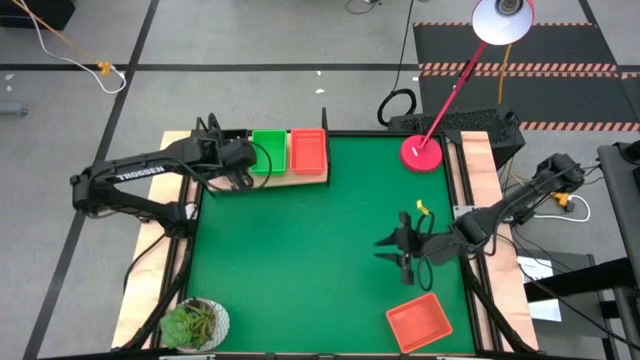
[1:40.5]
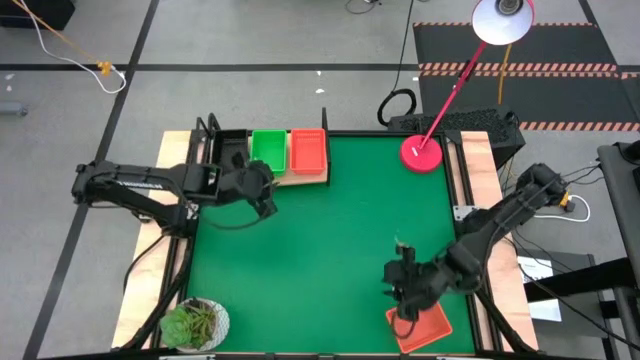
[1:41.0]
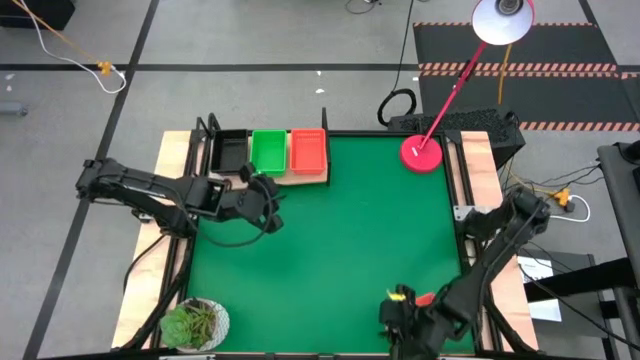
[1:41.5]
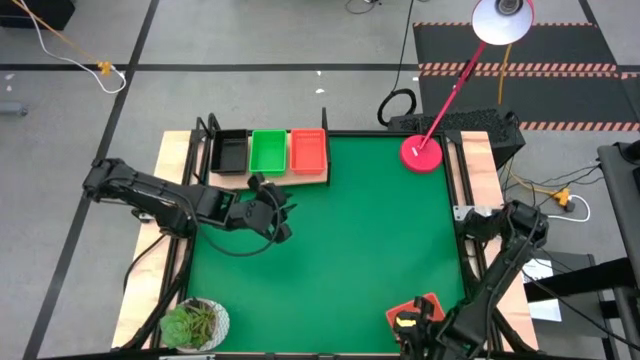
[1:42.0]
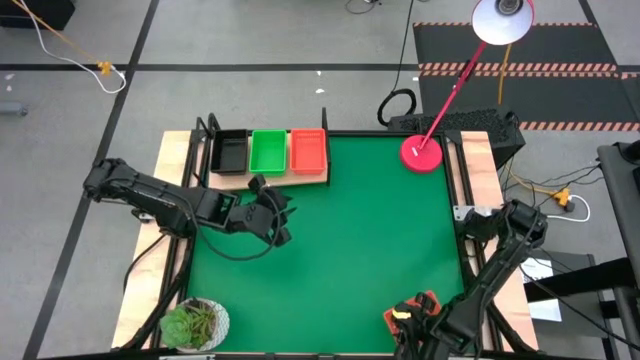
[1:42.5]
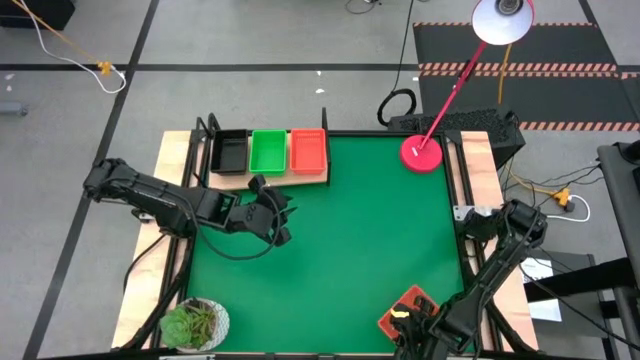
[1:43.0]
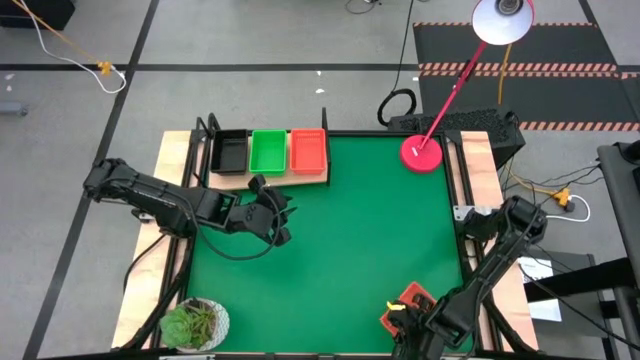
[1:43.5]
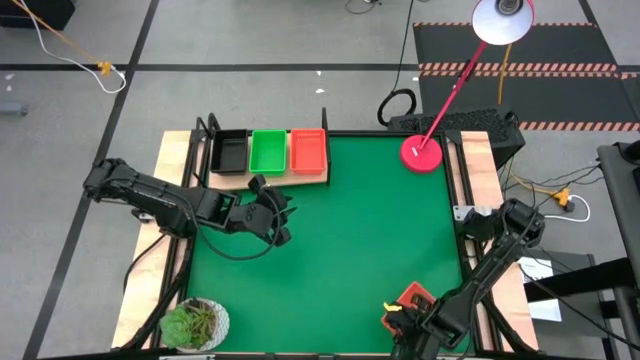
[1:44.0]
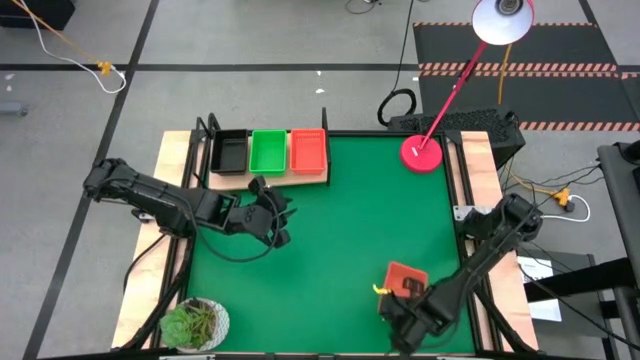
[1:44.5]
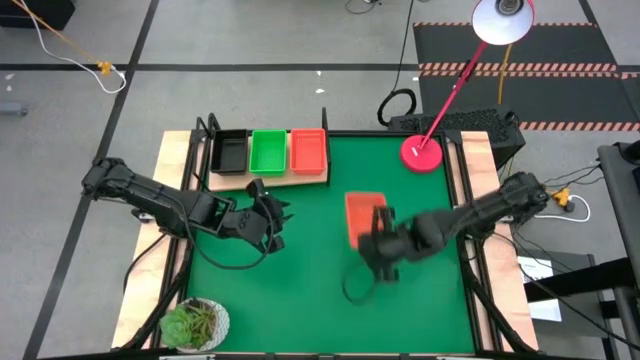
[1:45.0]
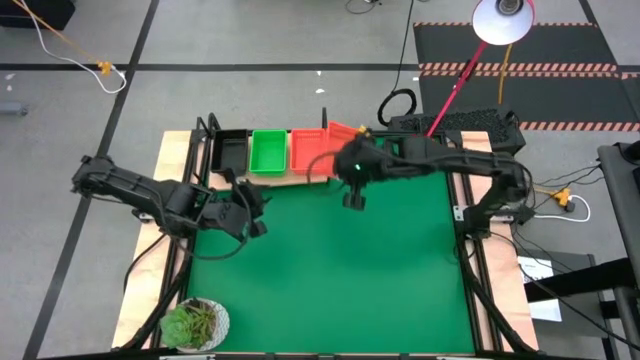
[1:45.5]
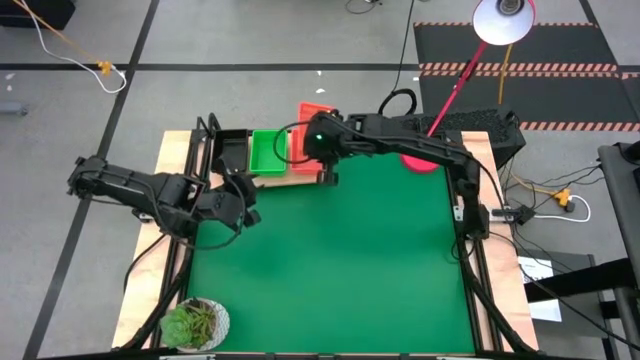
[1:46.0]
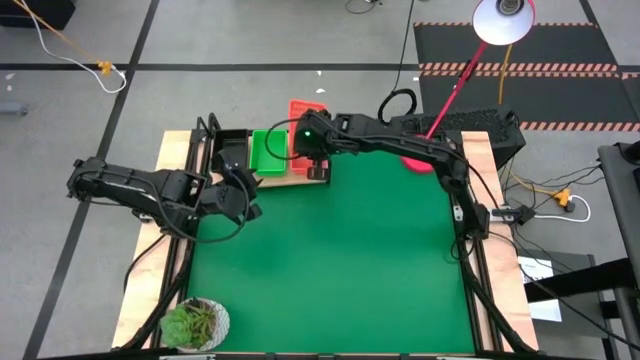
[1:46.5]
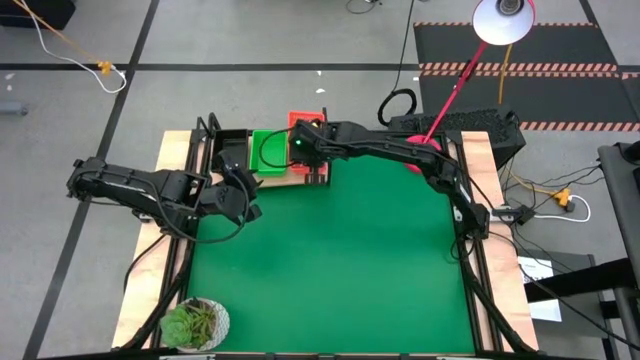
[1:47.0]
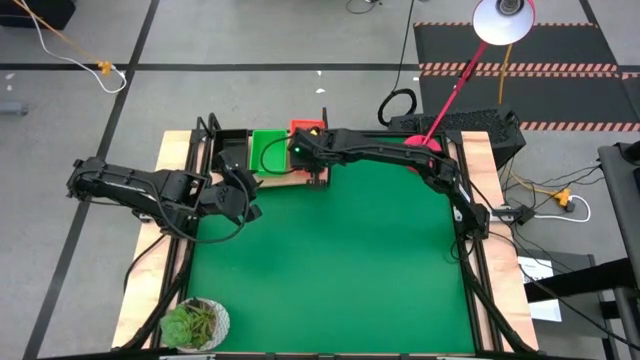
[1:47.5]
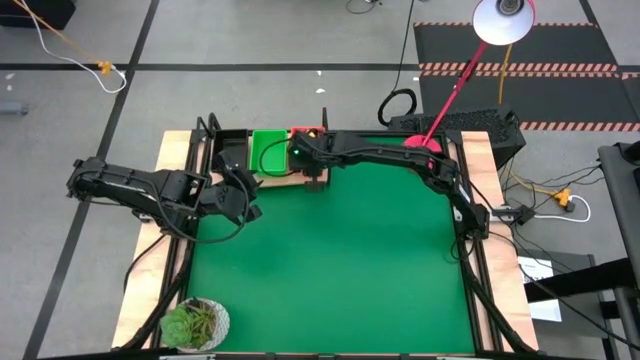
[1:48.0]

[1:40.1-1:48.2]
Task: Stack baskets on shelf by color
Stack the orange bin on top of the orange bin on the shelf

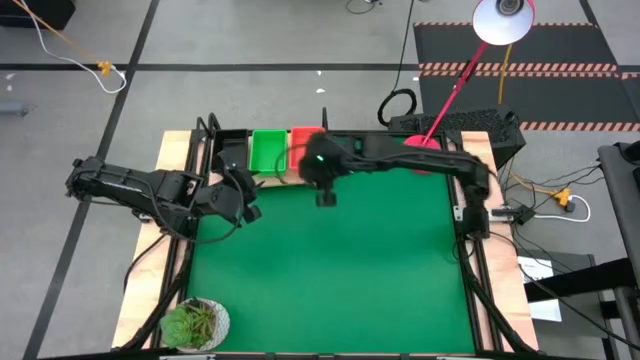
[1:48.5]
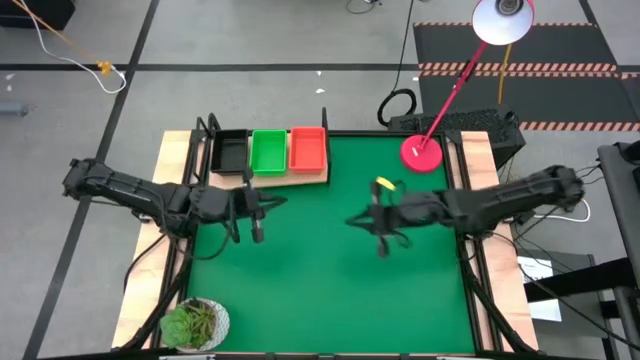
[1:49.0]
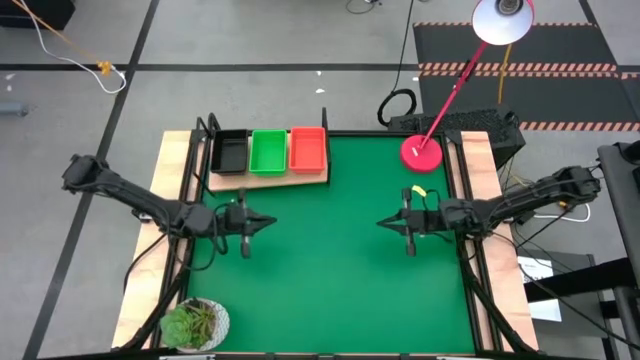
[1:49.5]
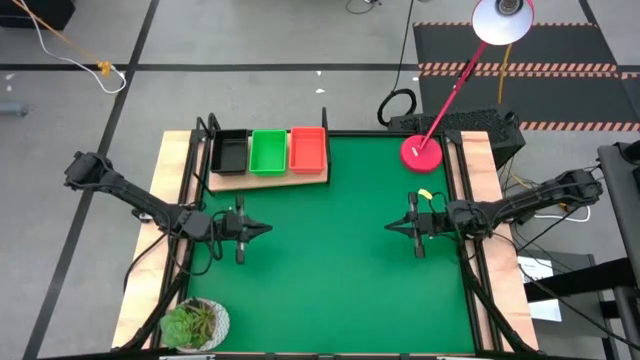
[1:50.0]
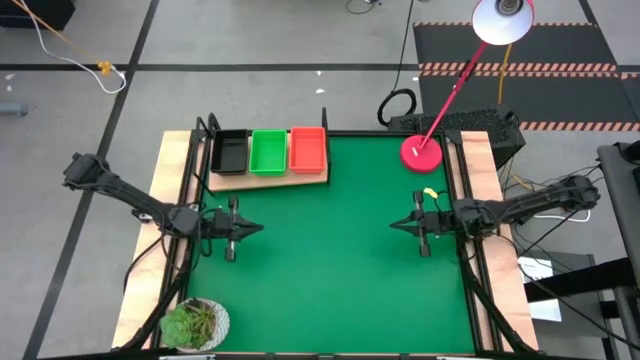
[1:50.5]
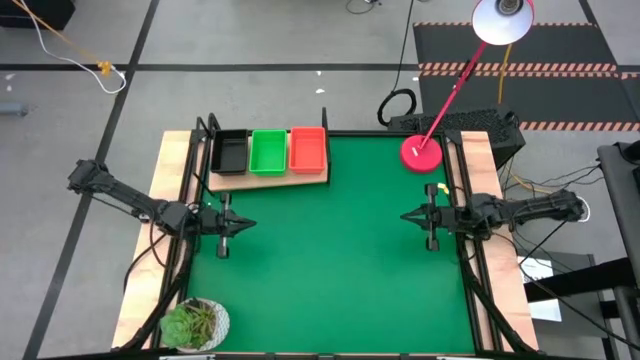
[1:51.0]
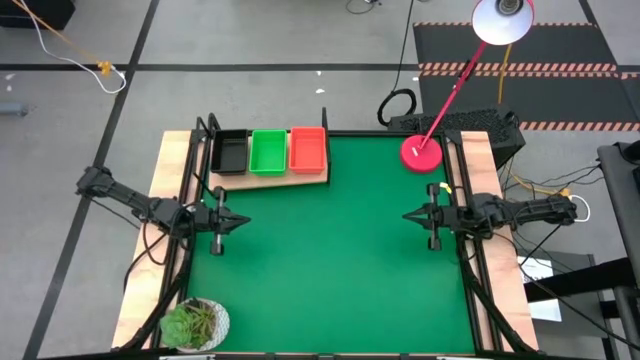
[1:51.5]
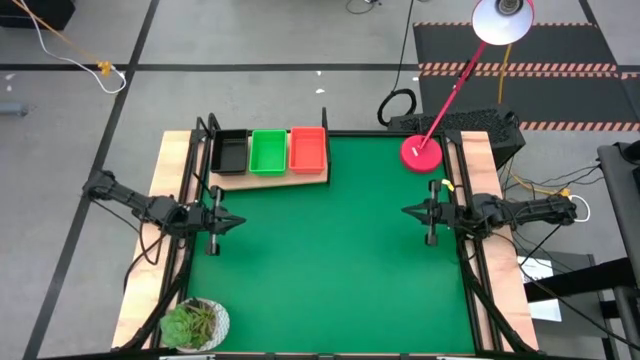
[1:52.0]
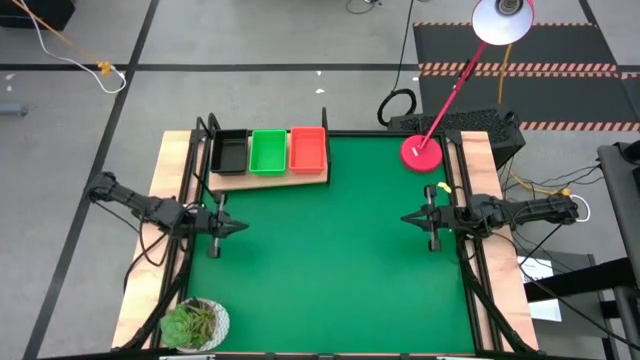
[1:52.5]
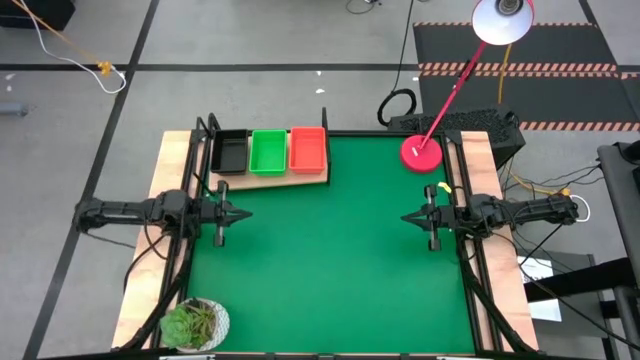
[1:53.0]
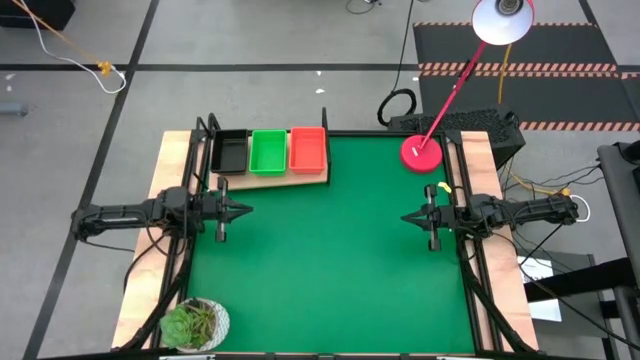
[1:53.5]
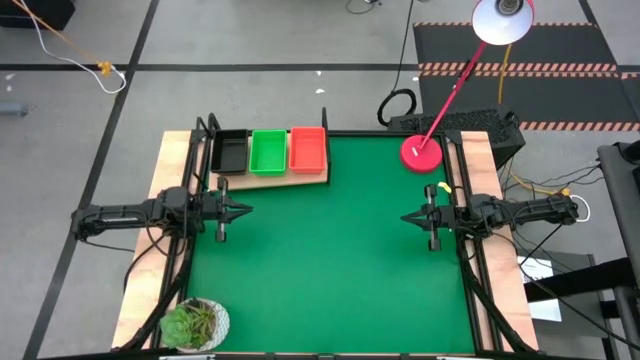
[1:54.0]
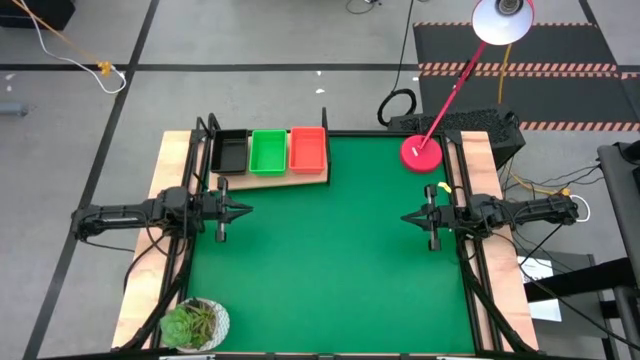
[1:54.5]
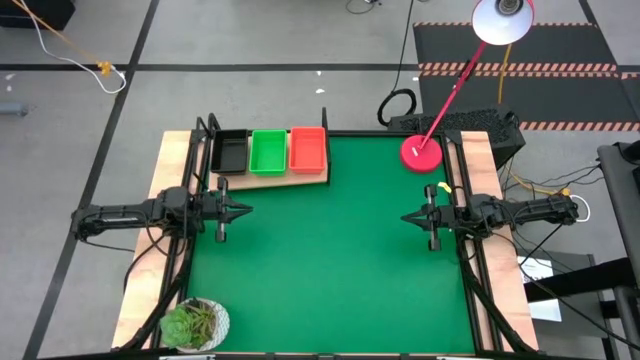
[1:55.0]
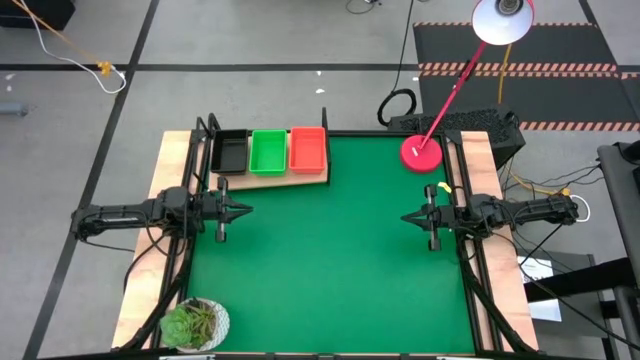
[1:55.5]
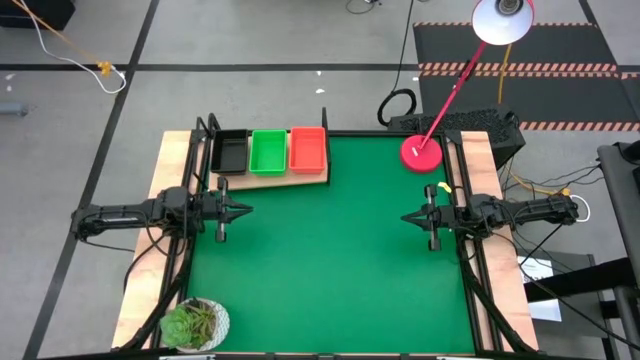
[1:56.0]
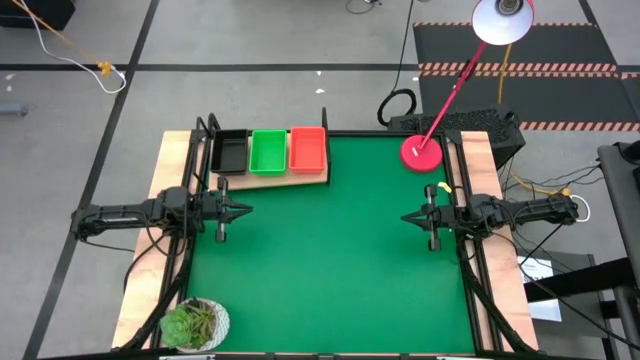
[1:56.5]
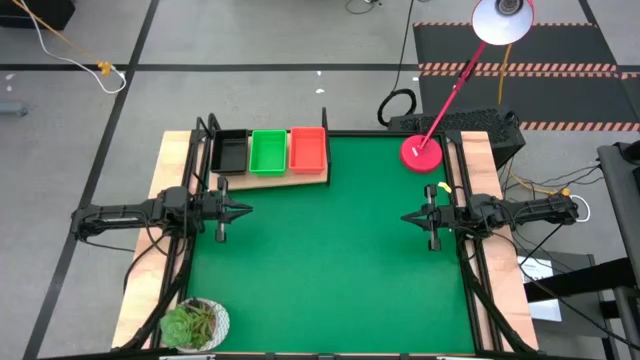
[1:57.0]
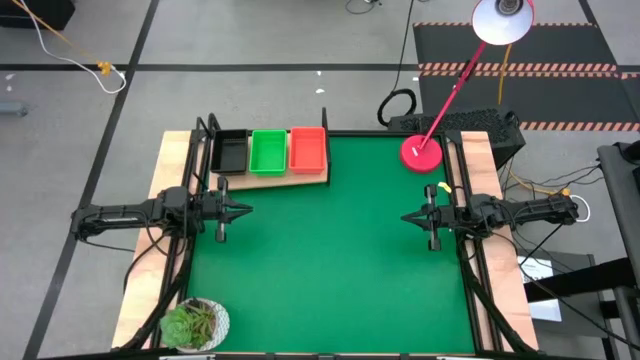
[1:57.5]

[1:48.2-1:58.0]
Return to Home Position
